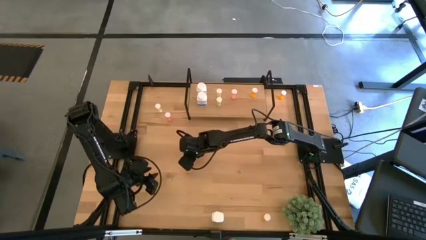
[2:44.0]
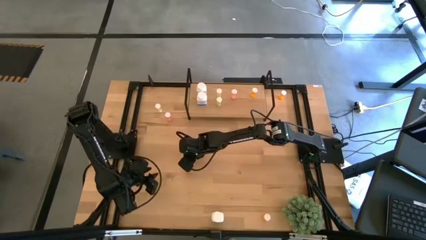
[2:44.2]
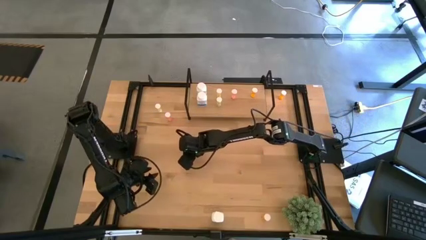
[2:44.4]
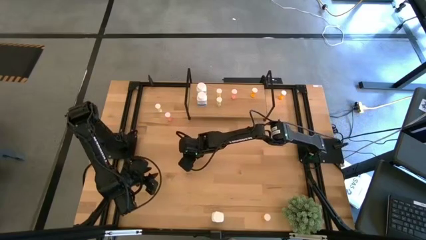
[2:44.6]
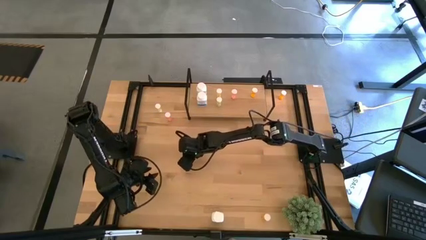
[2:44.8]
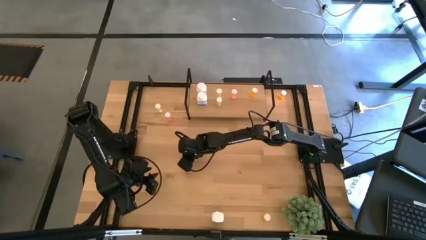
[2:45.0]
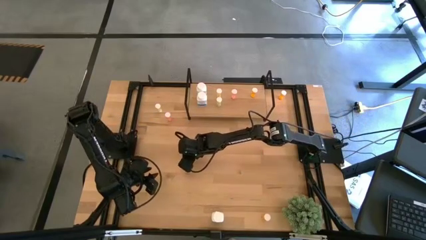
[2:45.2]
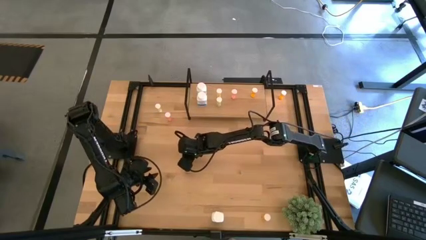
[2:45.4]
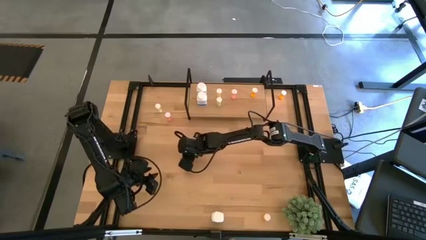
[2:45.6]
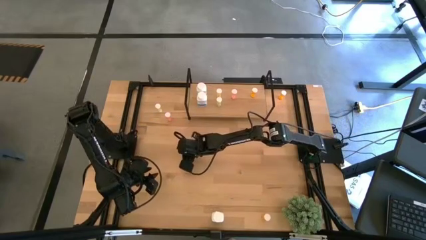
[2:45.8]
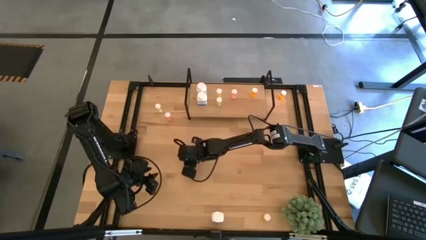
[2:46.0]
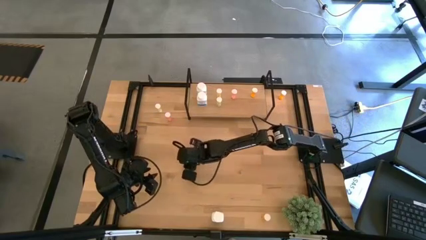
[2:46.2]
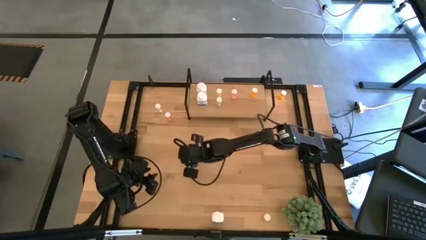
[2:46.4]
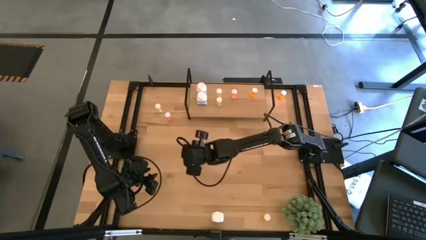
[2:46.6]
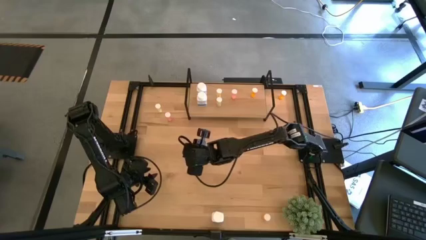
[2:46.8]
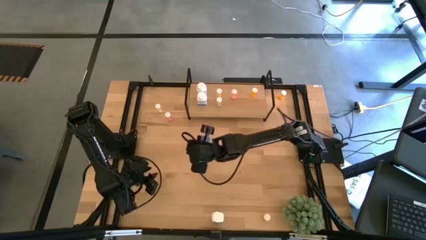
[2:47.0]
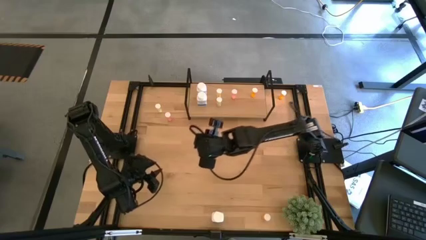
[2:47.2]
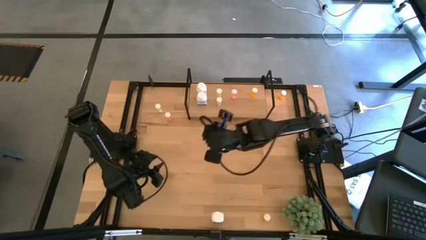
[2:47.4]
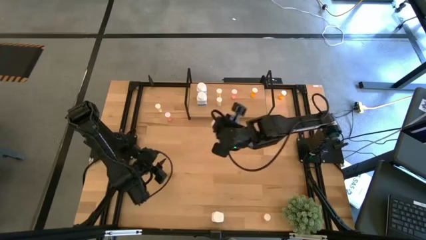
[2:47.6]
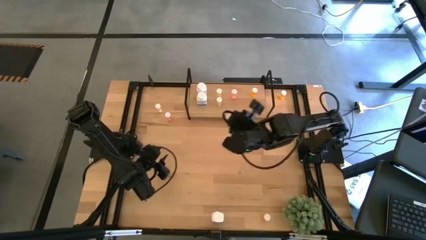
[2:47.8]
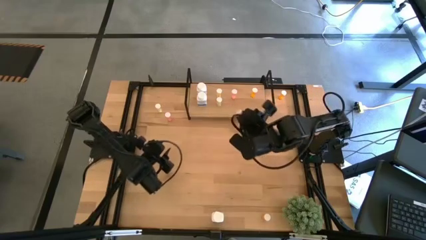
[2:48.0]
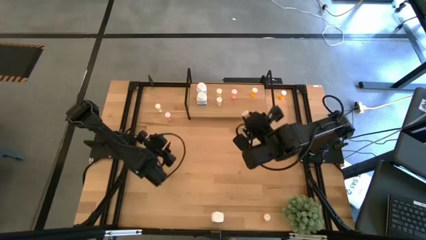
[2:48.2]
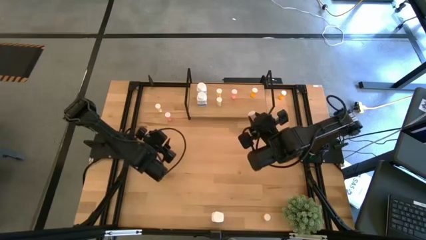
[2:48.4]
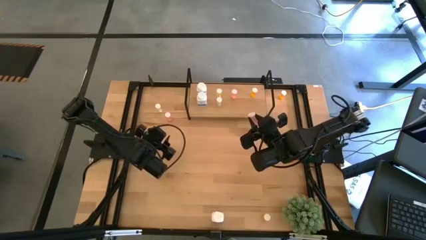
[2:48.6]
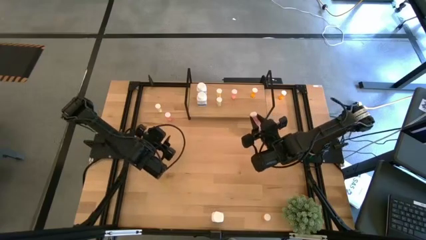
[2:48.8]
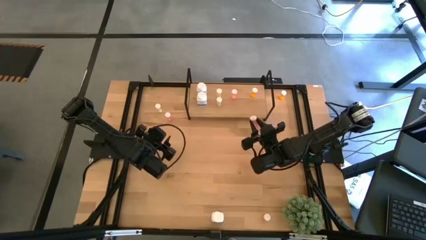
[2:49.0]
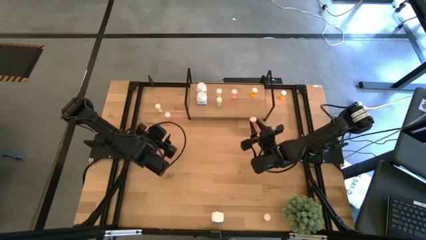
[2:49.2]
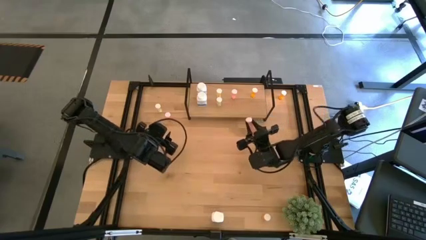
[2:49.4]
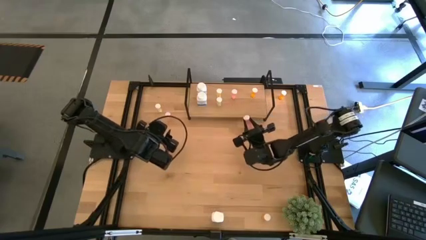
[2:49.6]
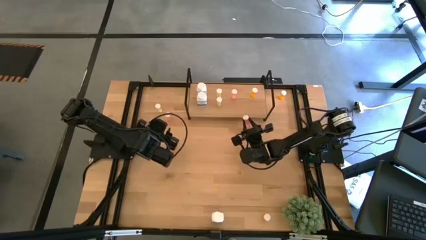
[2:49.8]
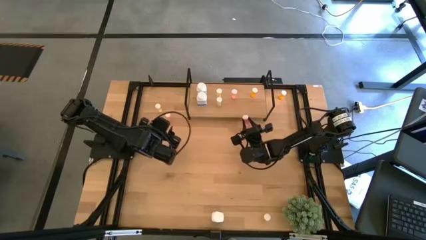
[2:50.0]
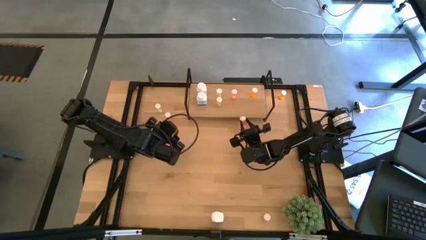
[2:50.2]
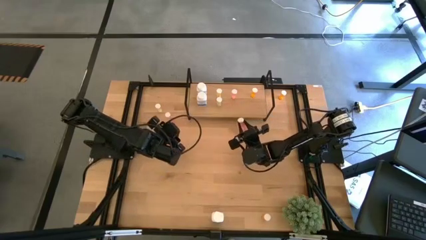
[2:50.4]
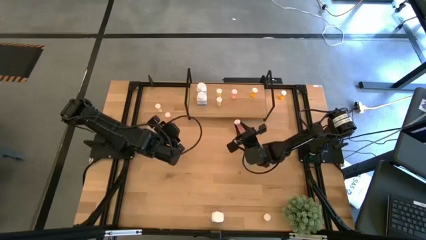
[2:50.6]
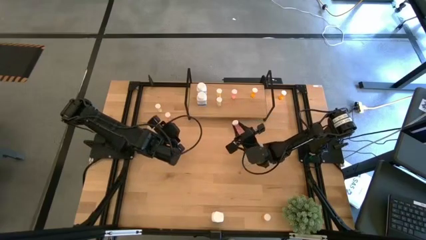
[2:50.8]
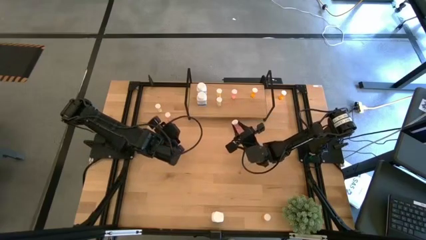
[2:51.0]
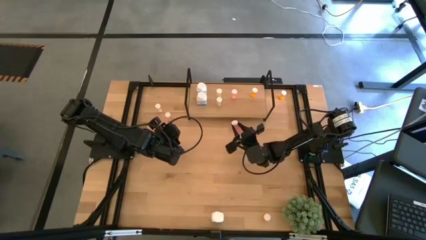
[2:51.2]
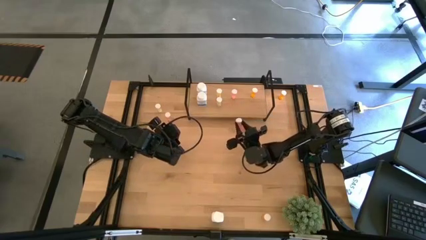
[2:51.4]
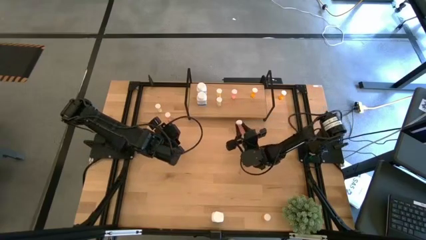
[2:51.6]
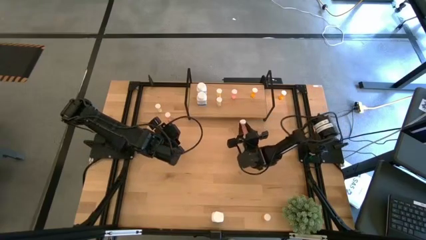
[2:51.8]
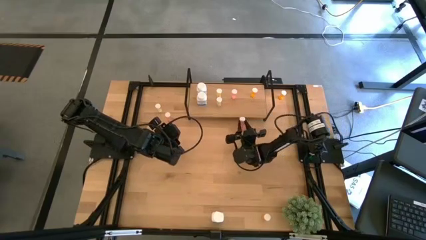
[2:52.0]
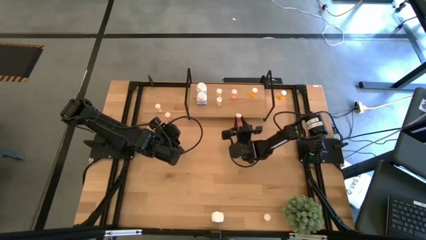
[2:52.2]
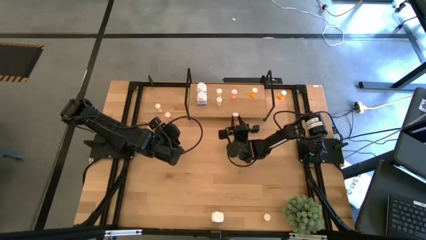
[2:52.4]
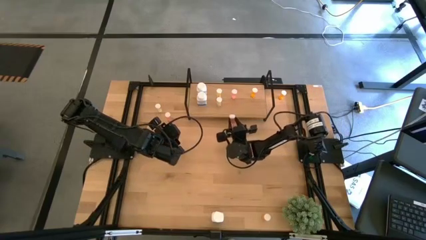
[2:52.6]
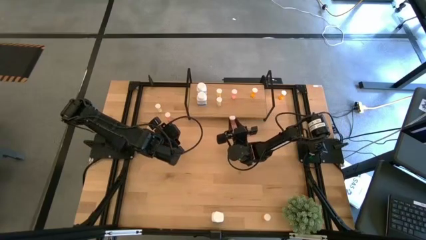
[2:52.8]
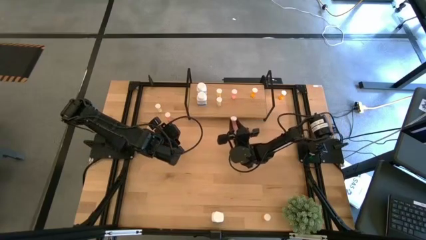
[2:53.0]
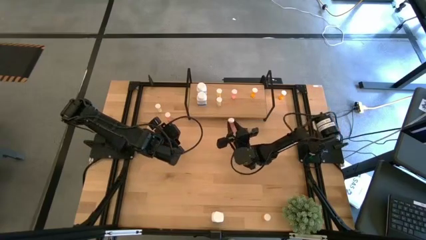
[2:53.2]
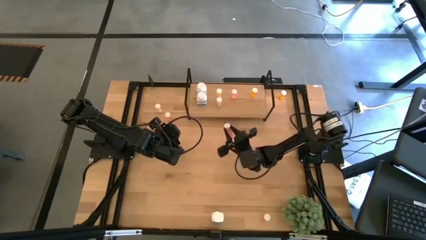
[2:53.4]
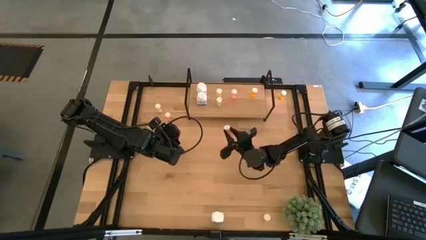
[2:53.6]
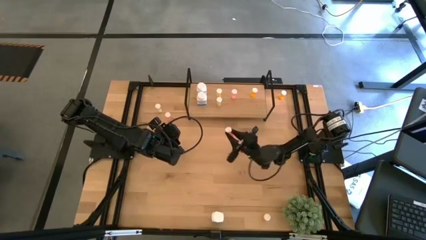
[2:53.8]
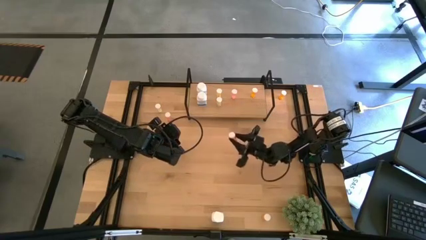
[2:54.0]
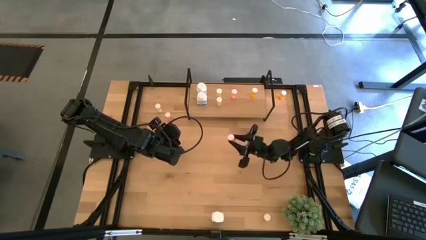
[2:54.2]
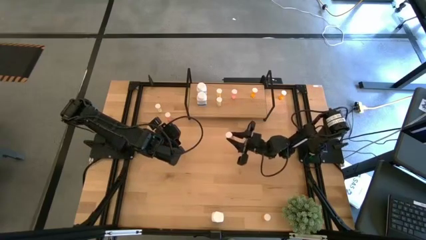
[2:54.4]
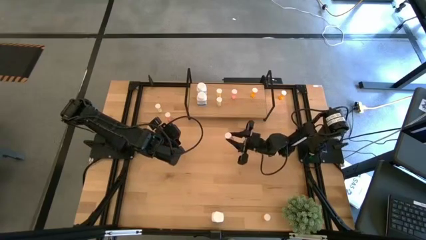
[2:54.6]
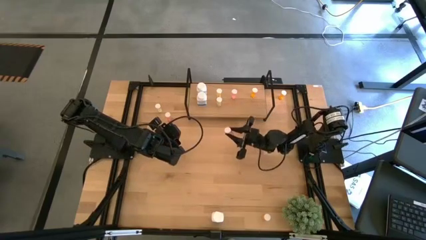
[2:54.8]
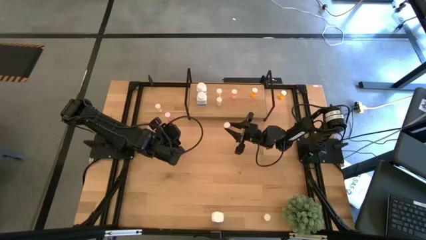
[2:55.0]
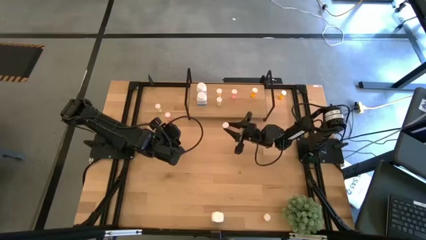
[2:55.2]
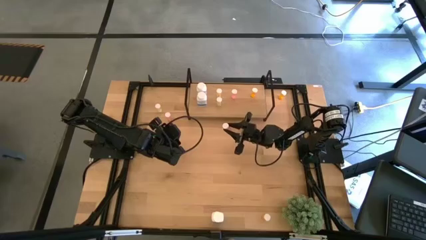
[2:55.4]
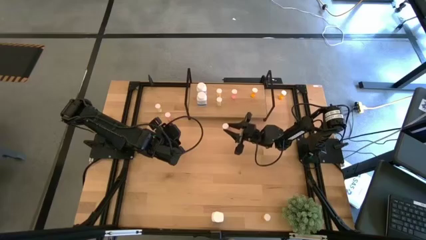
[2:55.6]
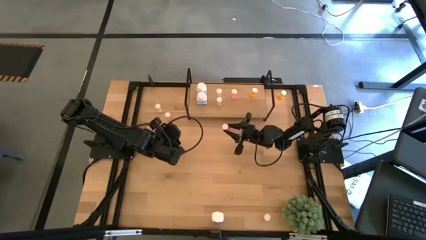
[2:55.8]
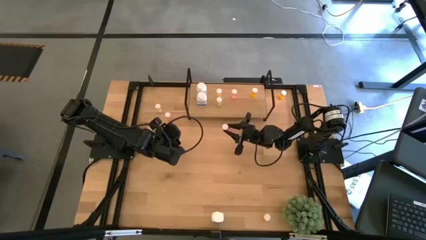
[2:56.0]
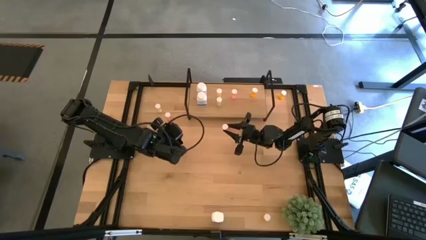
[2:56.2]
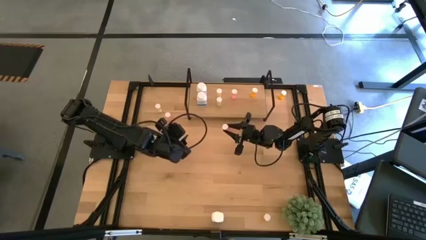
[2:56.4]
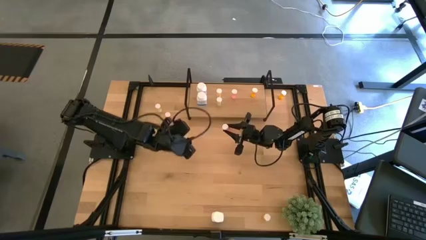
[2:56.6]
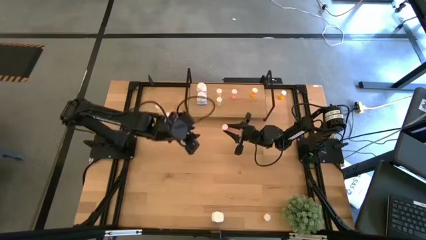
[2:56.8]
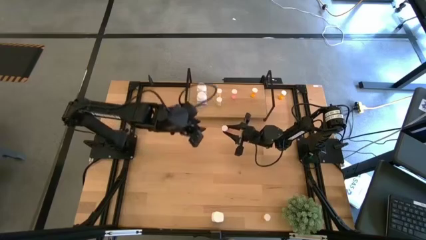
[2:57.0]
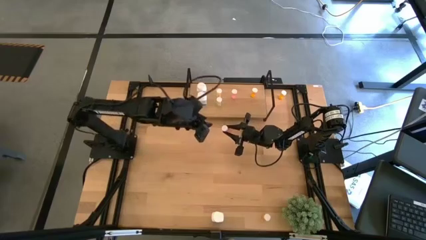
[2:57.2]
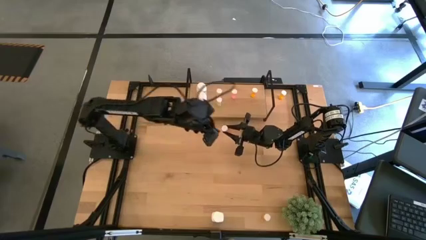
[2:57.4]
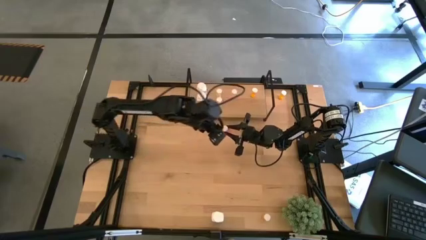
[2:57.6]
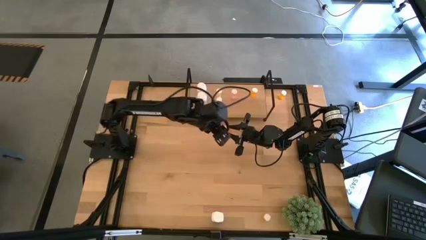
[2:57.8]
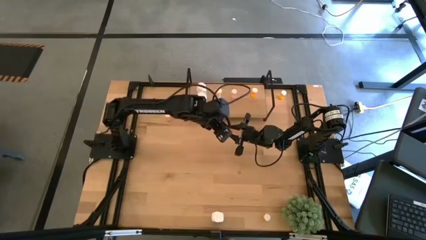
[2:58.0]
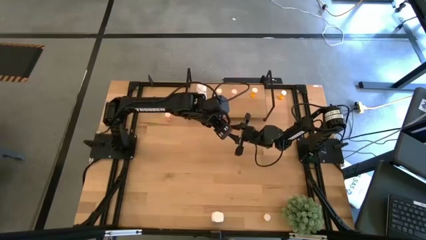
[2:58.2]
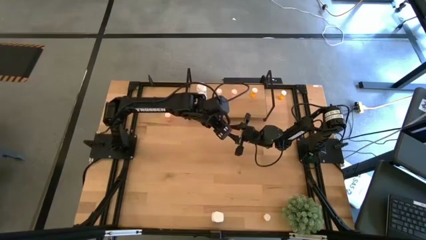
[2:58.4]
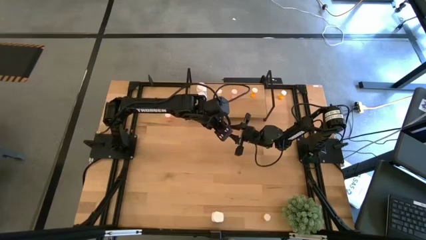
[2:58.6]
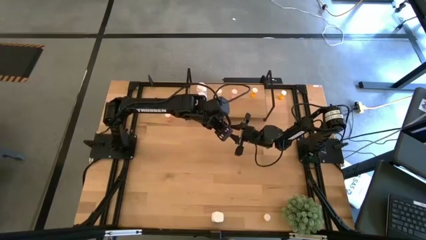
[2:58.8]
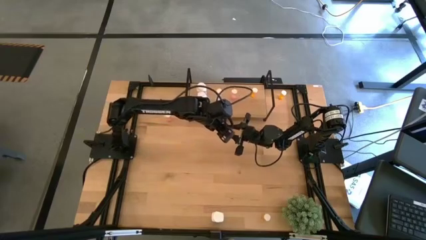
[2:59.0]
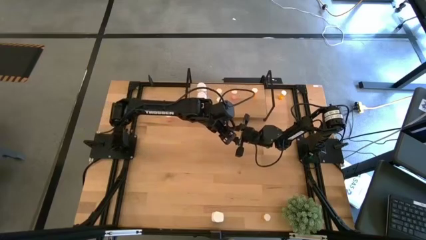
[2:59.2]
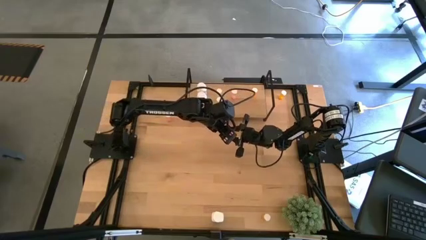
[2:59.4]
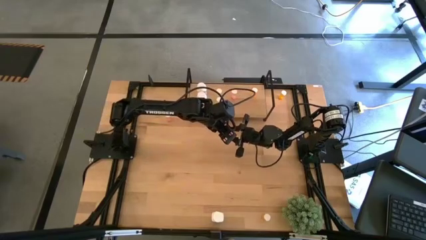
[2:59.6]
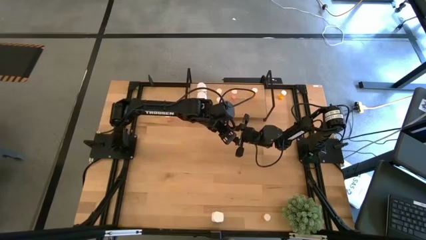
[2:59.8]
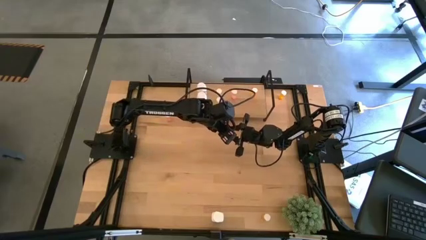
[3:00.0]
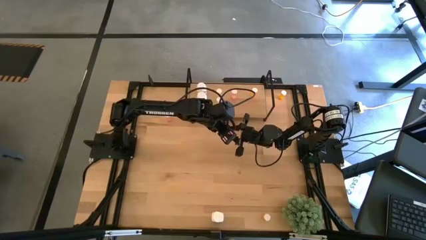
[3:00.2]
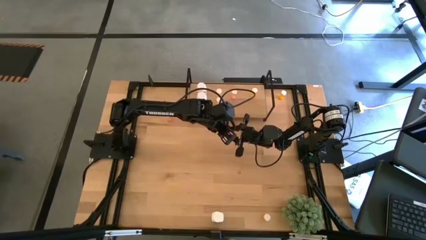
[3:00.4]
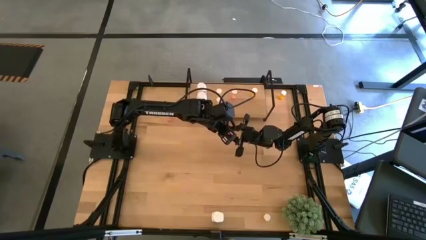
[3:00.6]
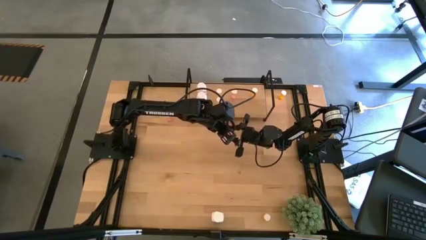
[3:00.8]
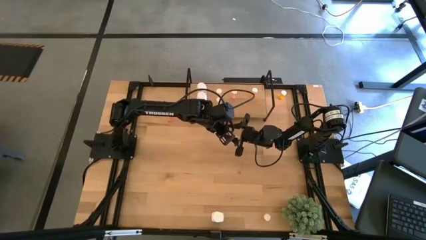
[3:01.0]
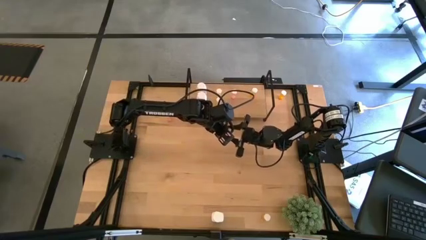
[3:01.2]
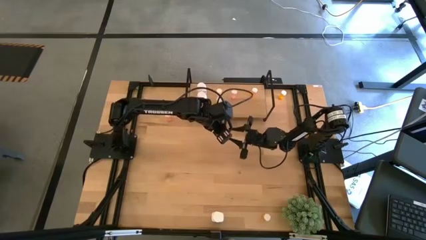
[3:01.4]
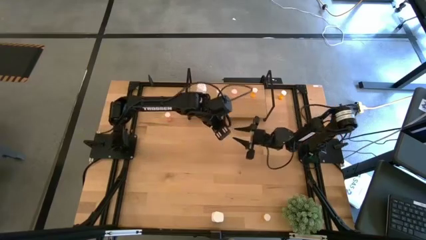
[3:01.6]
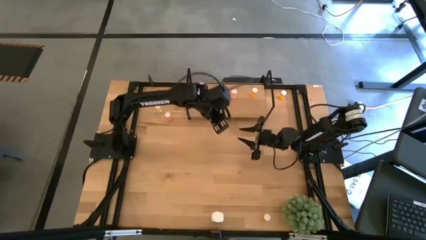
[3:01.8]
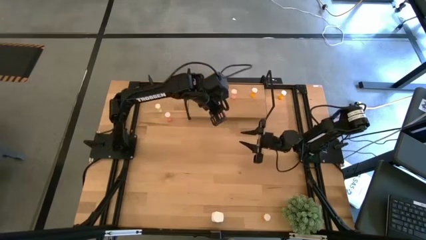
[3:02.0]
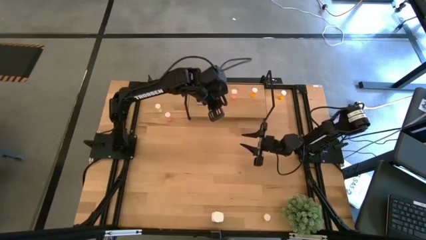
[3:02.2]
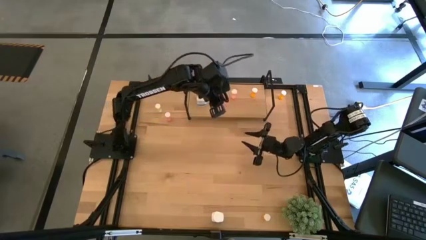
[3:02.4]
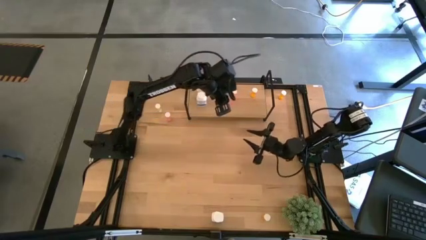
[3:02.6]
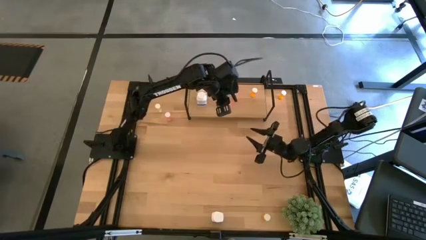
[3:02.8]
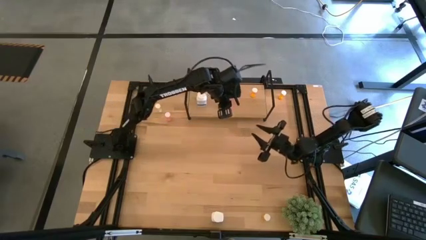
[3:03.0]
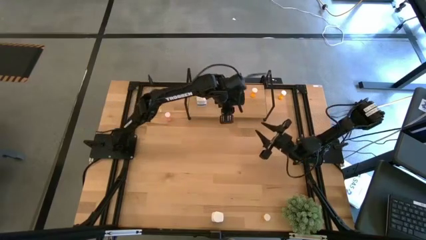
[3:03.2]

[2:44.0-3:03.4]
Task: Pick and place medicine bottles onto shelf by color
Put the bottom red pill bottle on the shelf aligned with the other red pill bottle
